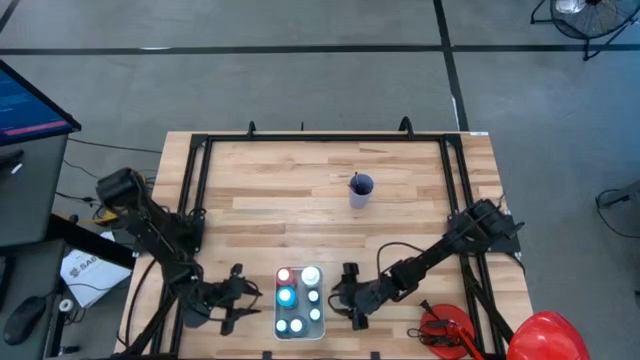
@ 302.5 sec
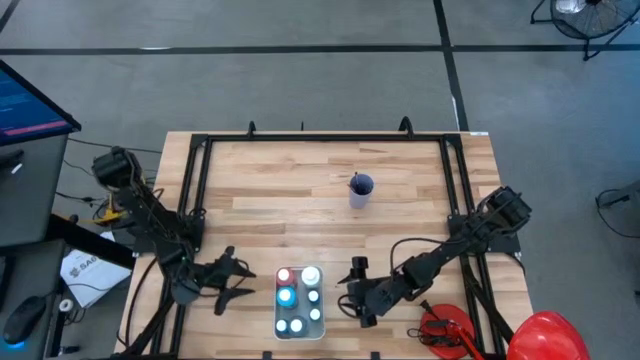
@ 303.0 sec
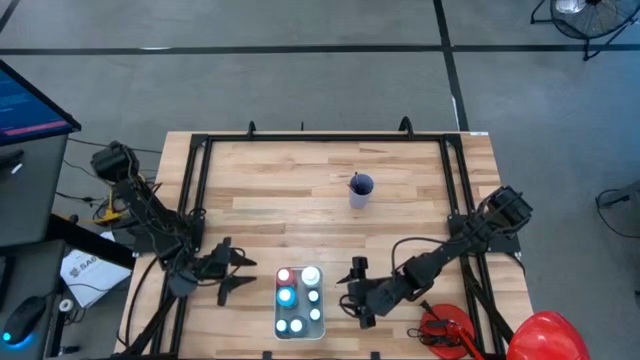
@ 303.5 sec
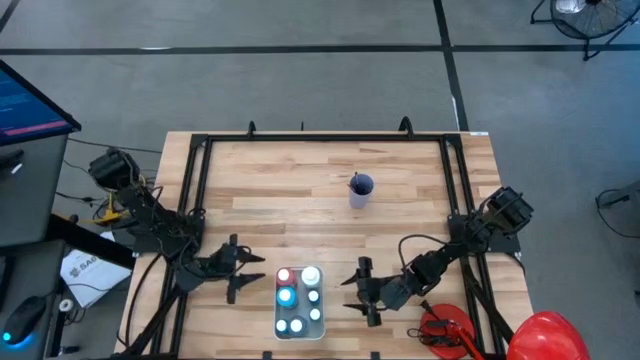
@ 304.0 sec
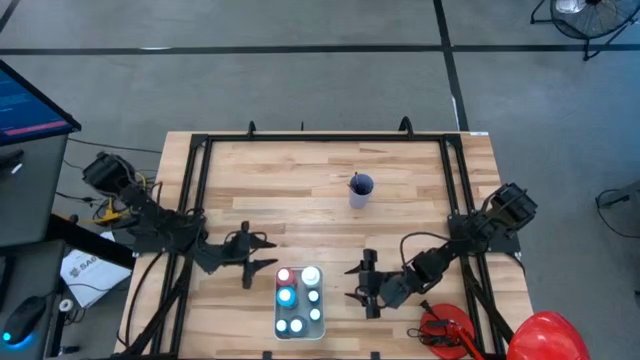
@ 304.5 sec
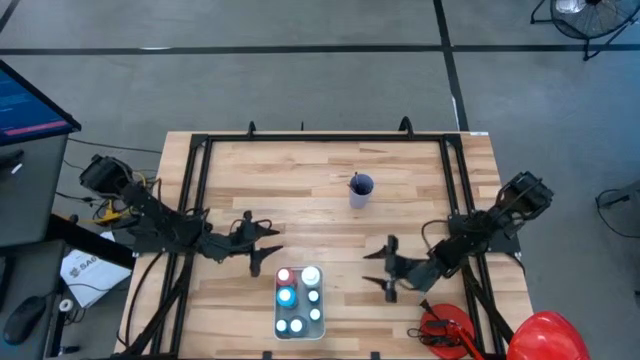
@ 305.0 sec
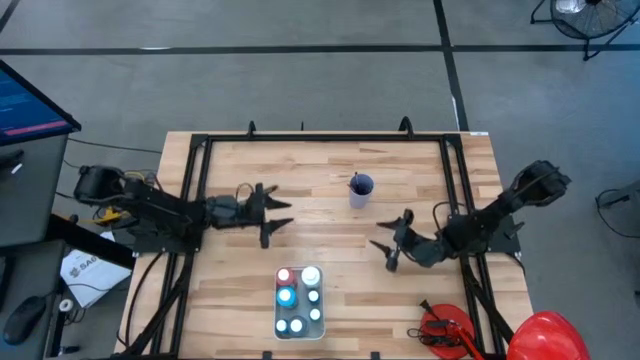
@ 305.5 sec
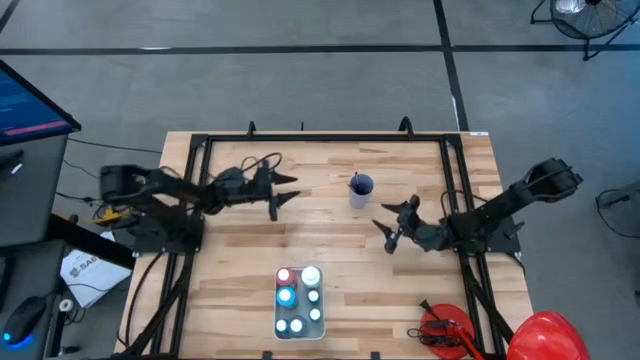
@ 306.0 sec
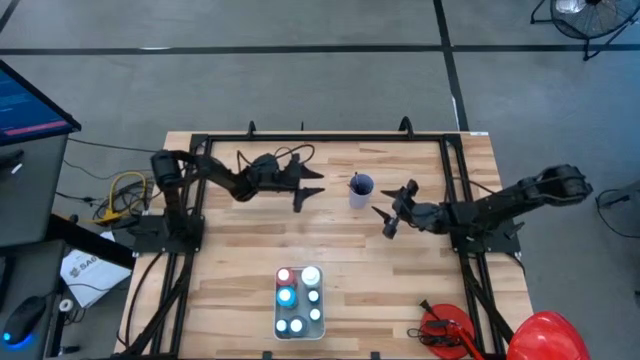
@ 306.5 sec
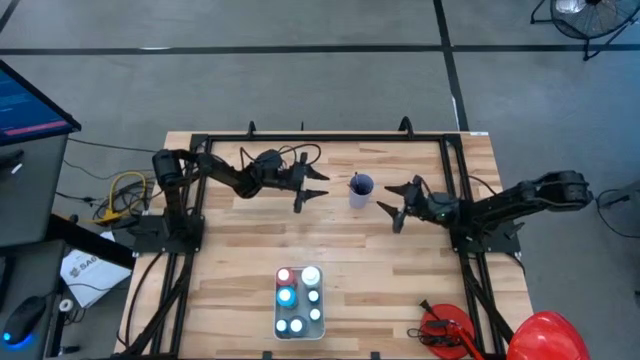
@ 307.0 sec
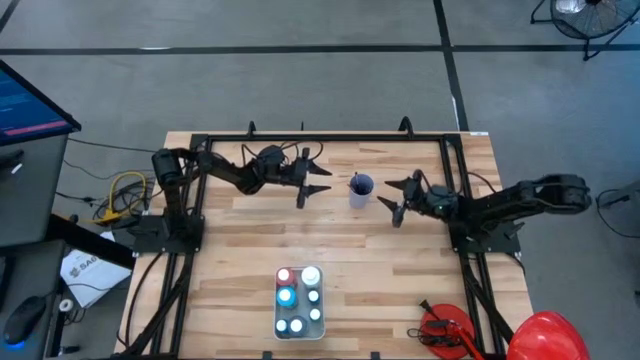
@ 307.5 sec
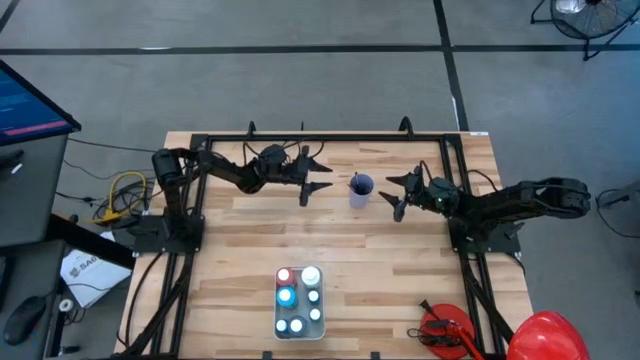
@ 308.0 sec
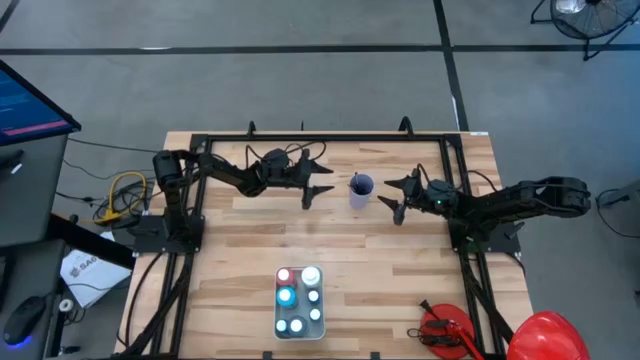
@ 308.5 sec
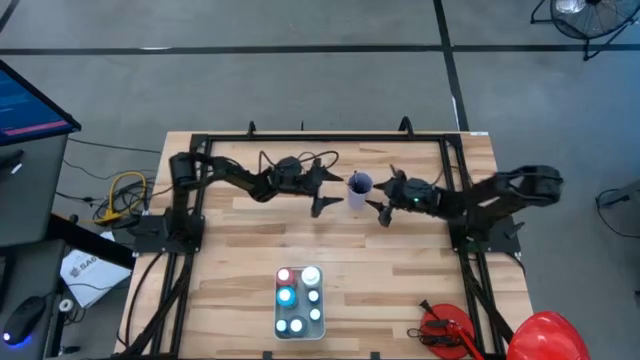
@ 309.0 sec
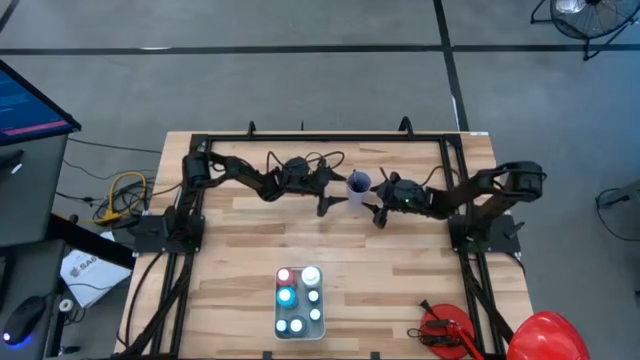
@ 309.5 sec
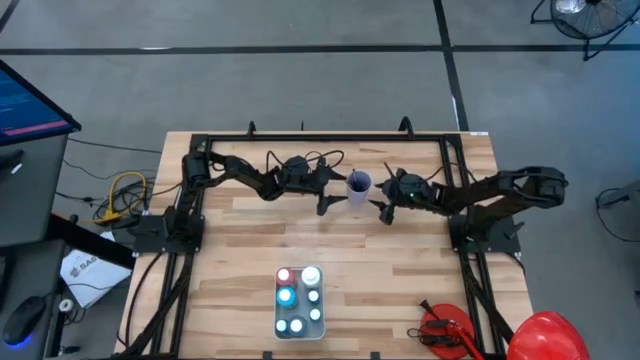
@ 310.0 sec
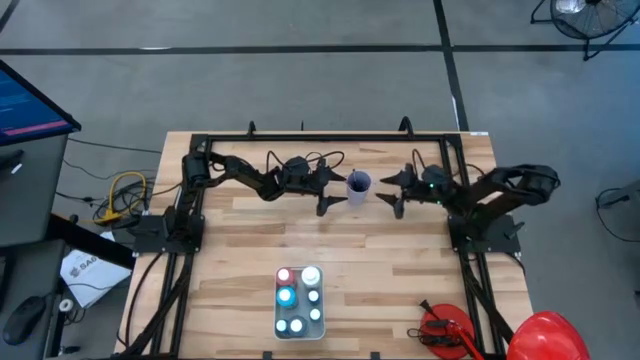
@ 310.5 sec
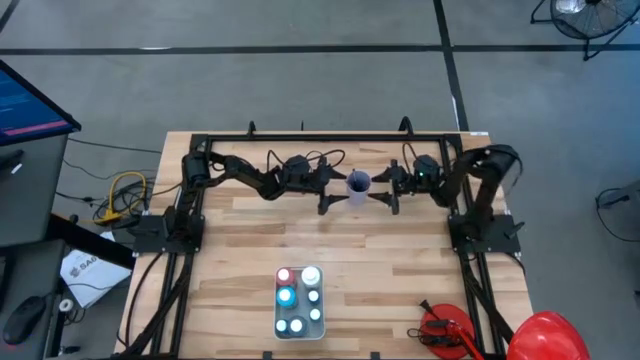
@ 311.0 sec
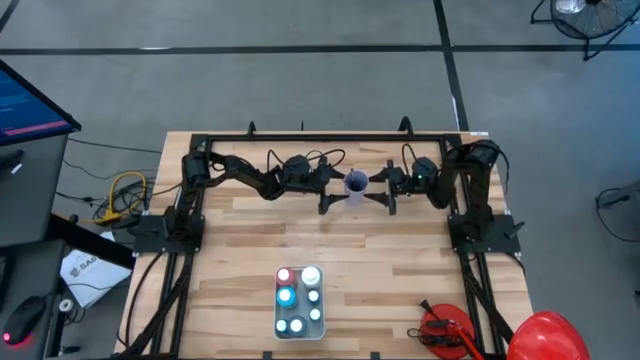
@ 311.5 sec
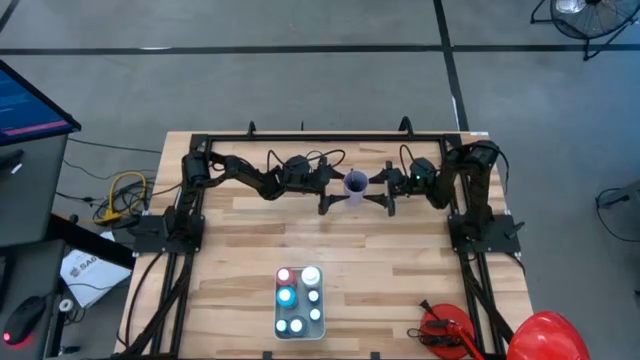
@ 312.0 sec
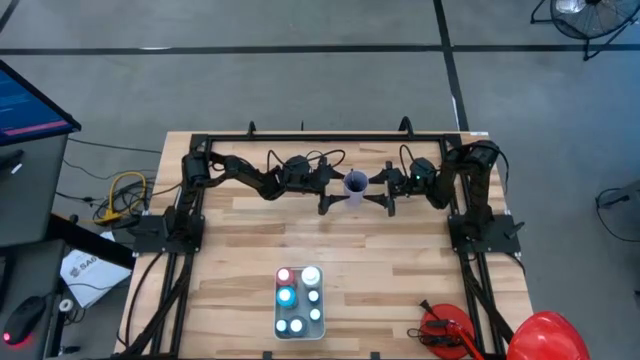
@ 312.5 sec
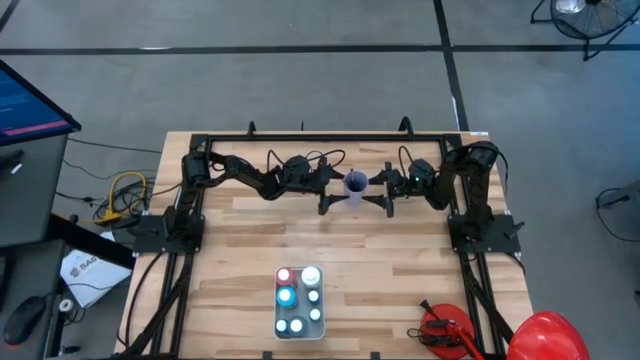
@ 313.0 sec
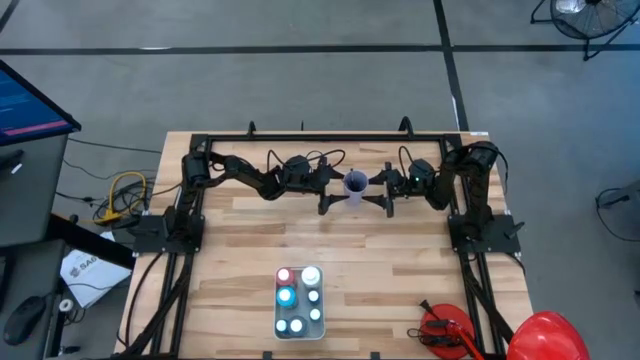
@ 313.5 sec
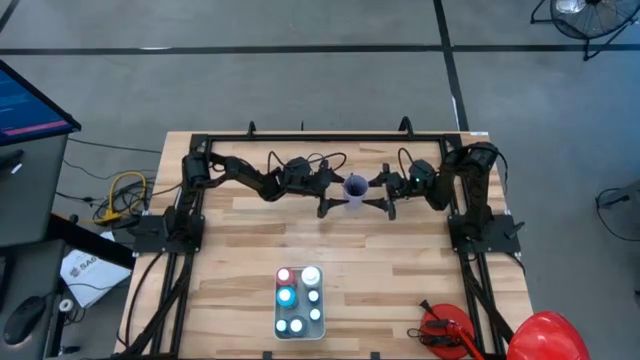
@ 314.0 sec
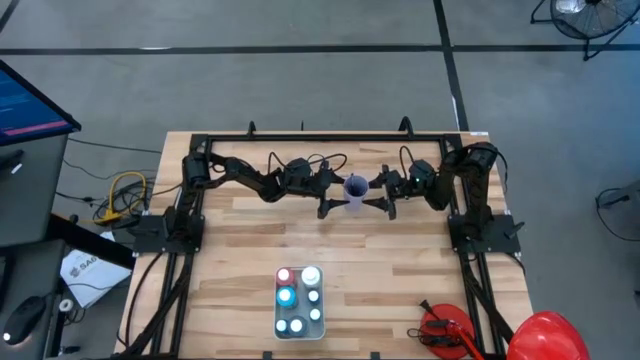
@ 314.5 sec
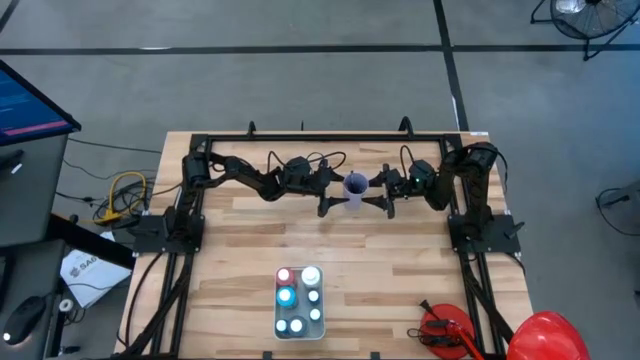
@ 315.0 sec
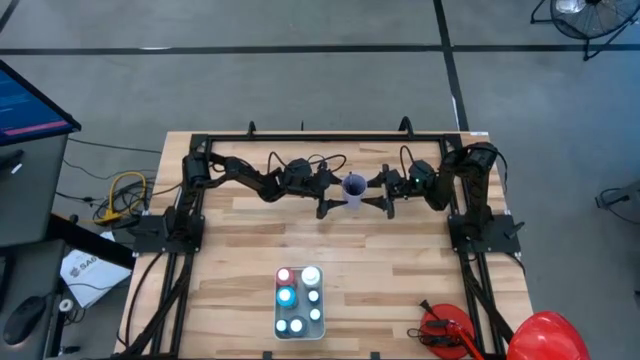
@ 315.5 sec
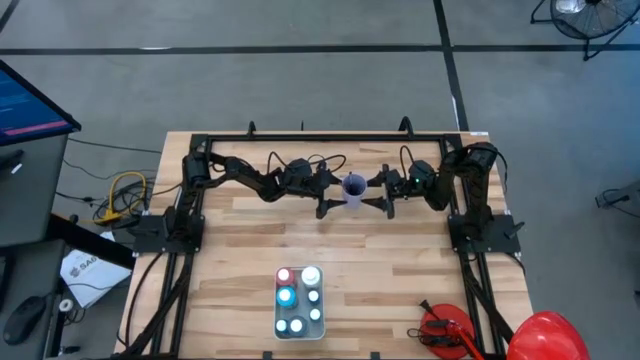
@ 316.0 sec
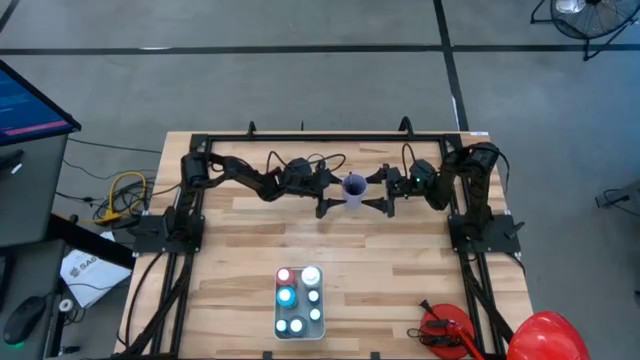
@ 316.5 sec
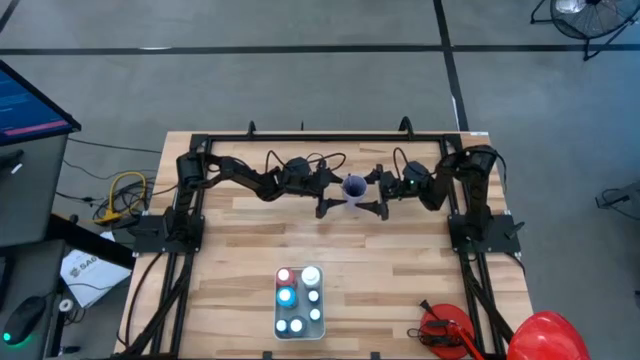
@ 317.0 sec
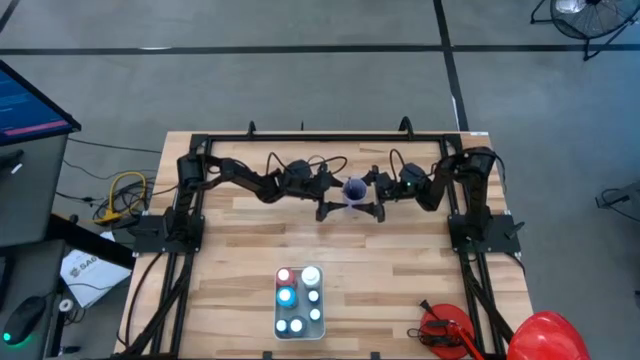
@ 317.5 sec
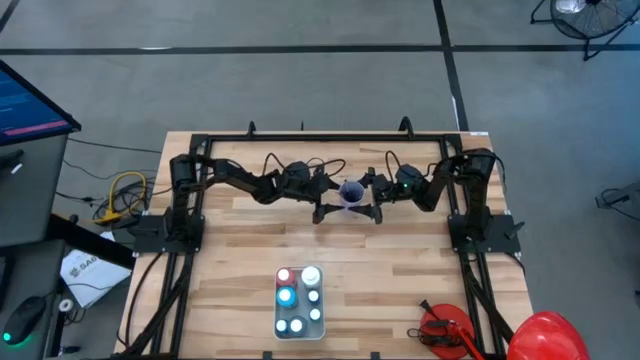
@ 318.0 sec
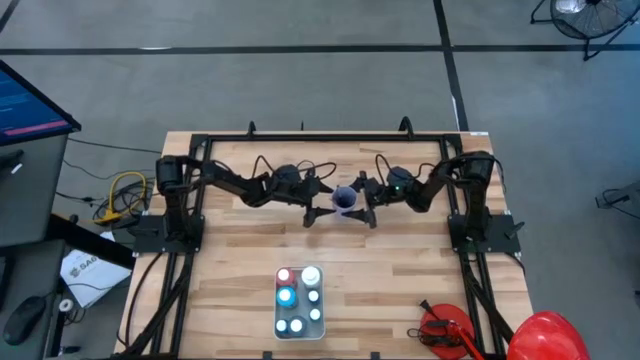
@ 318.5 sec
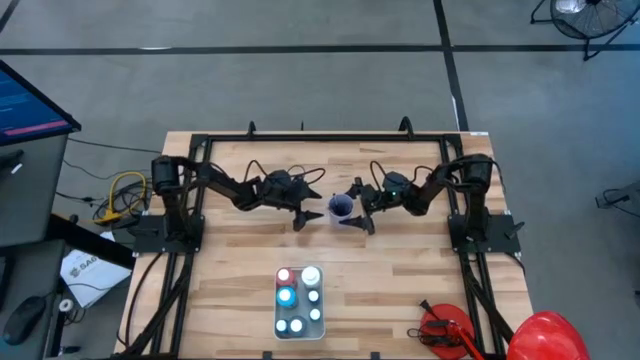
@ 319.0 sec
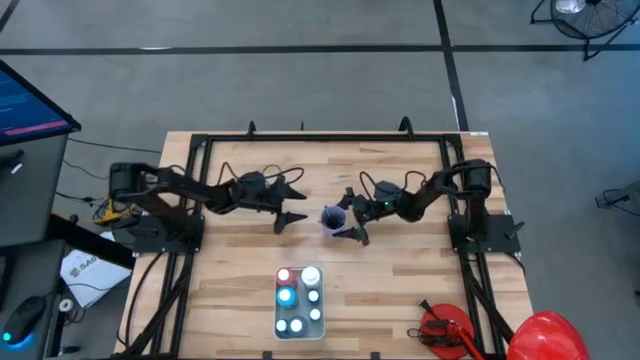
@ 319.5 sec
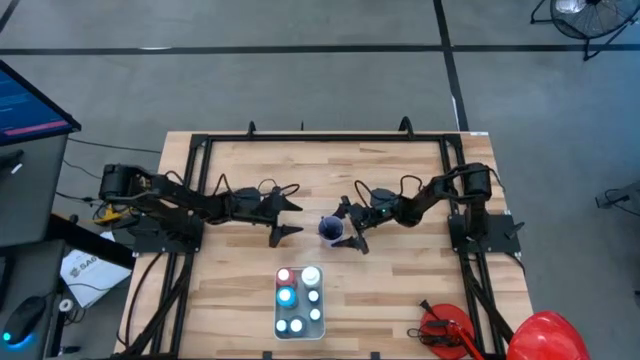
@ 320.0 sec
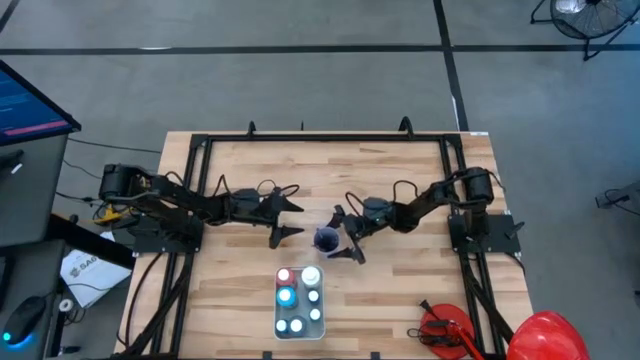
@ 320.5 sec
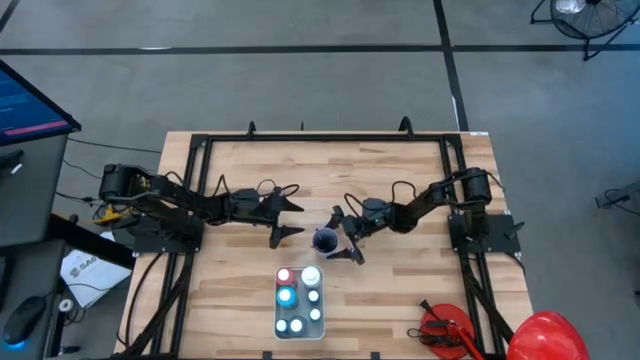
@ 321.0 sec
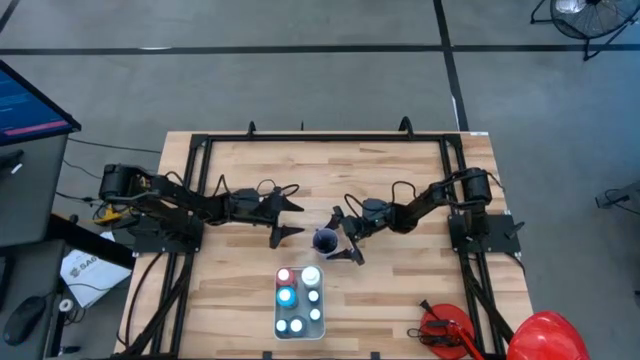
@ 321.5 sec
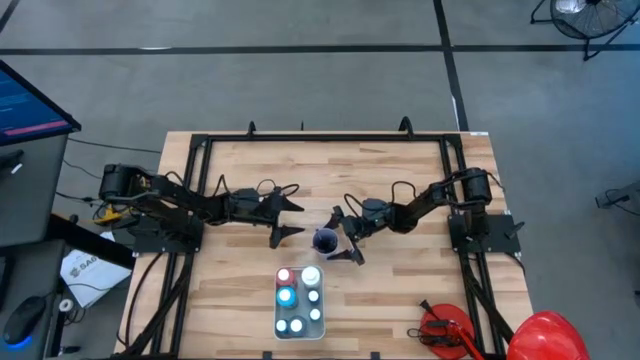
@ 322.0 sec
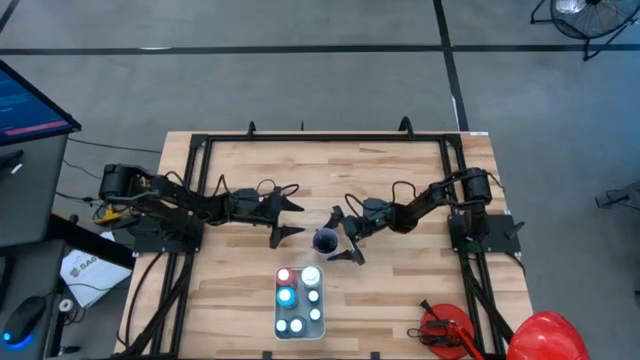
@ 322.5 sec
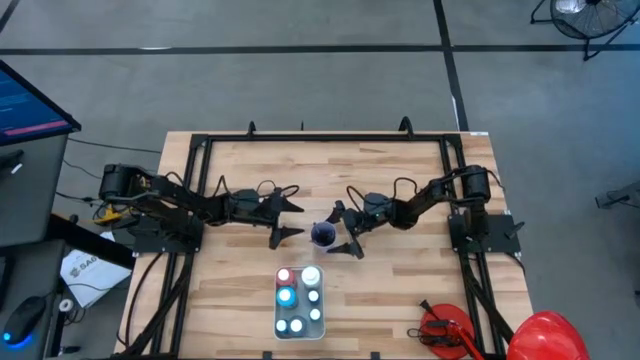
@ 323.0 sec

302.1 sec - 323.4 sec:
Task: Pick & Place Paint Supplies
Move the violet cup from the top to the center of the table
